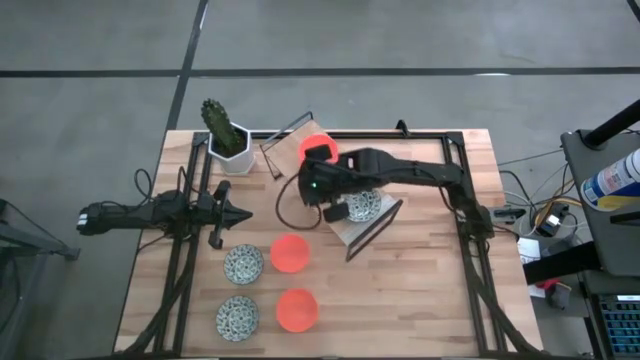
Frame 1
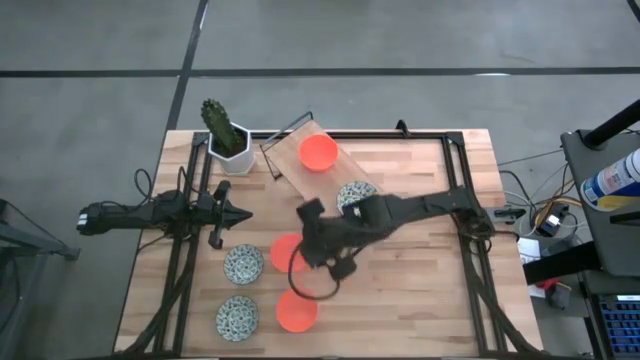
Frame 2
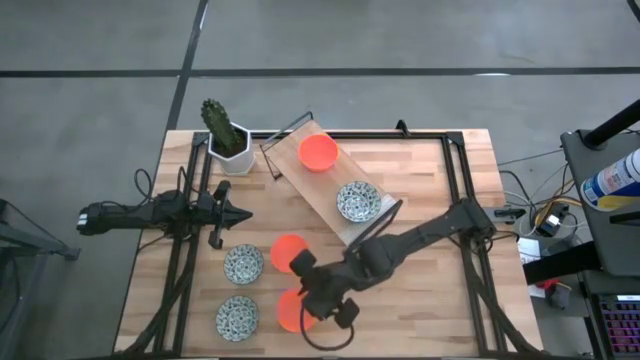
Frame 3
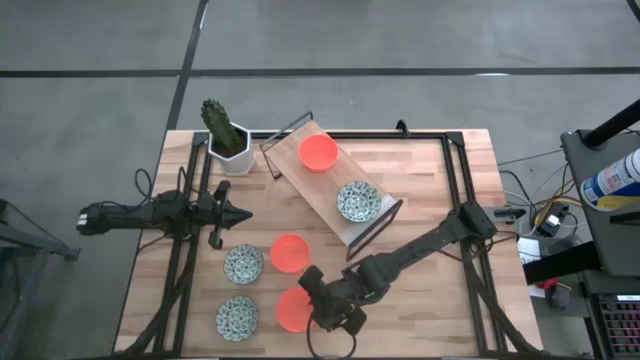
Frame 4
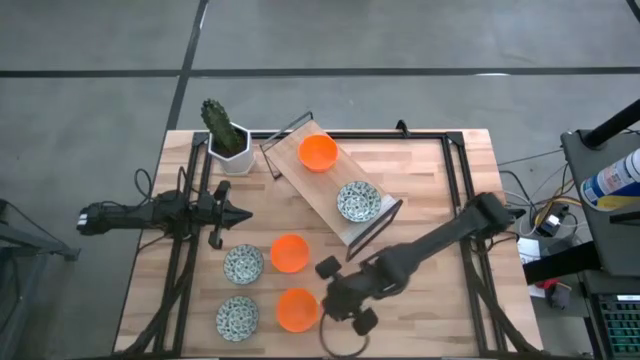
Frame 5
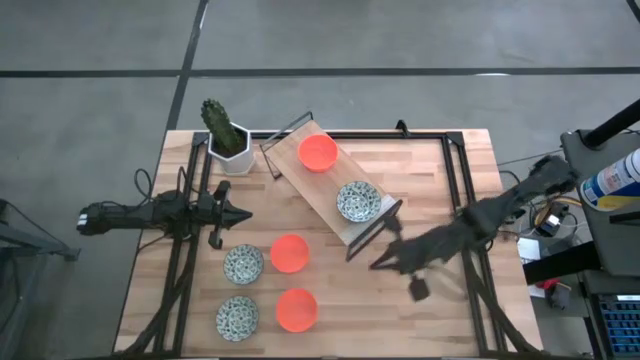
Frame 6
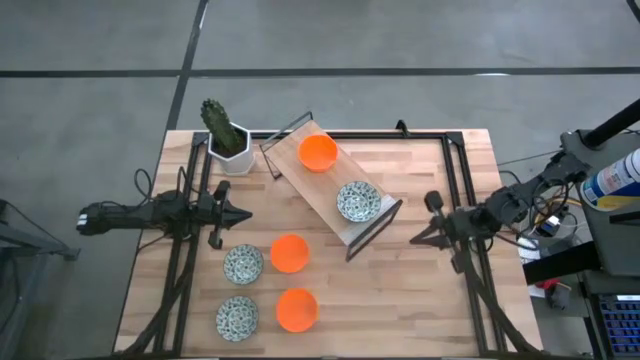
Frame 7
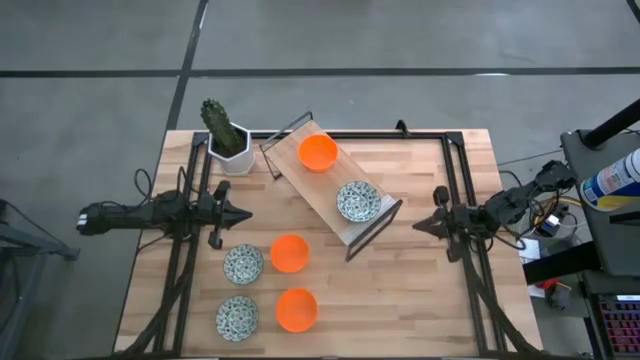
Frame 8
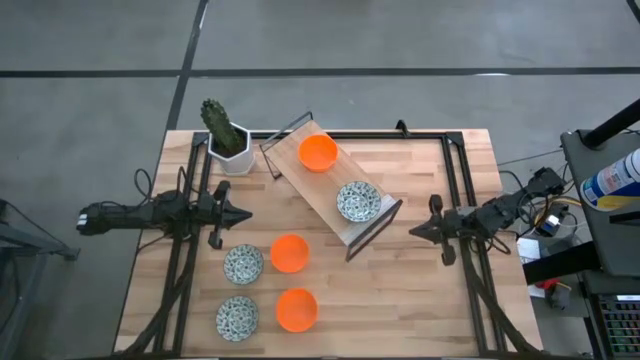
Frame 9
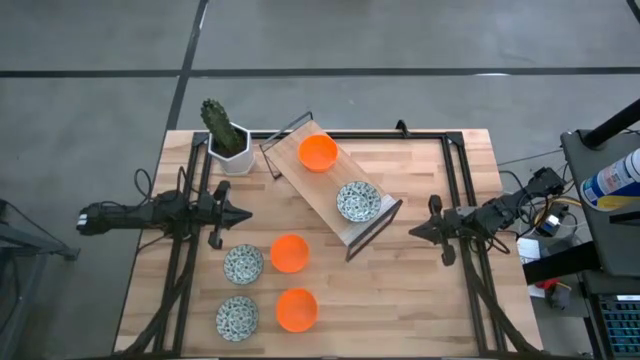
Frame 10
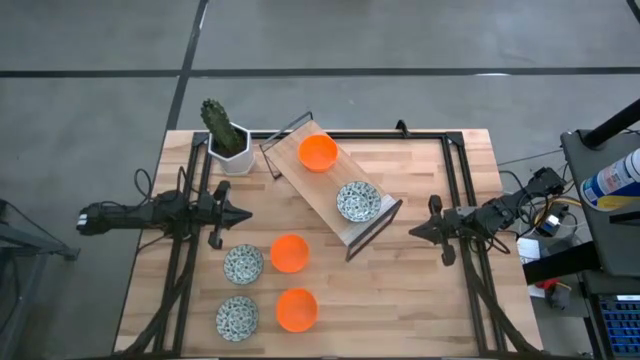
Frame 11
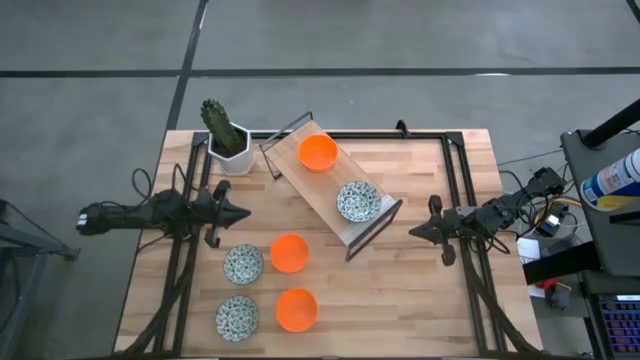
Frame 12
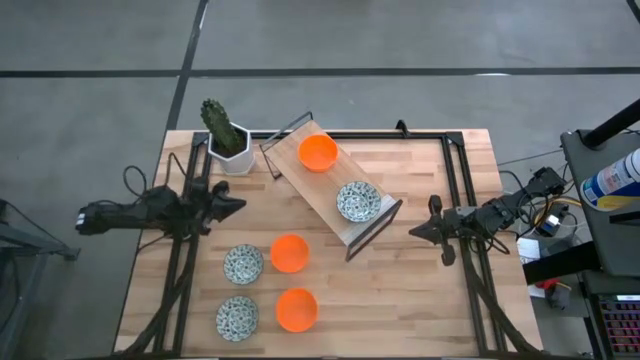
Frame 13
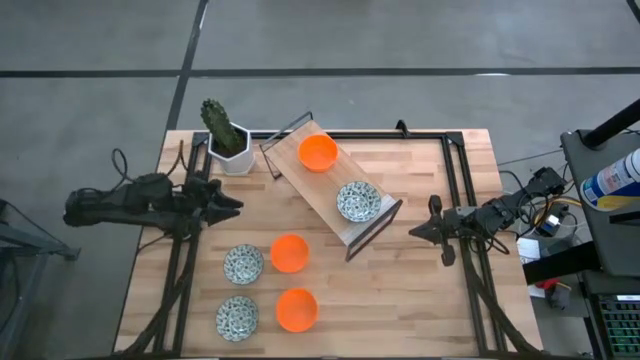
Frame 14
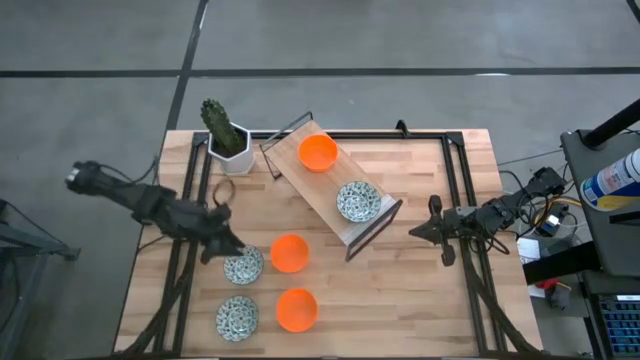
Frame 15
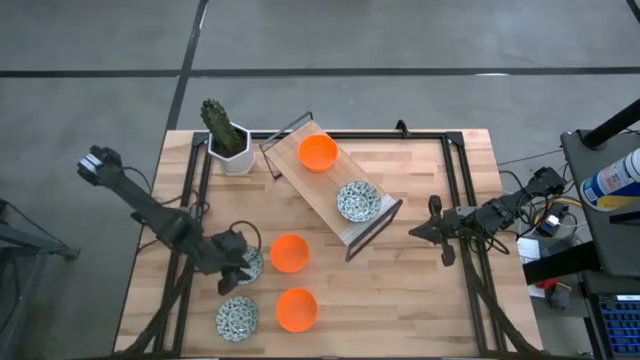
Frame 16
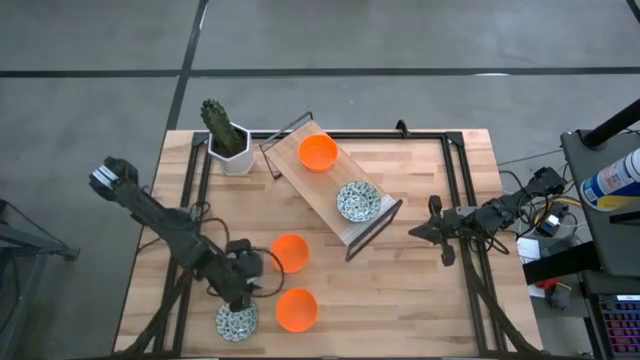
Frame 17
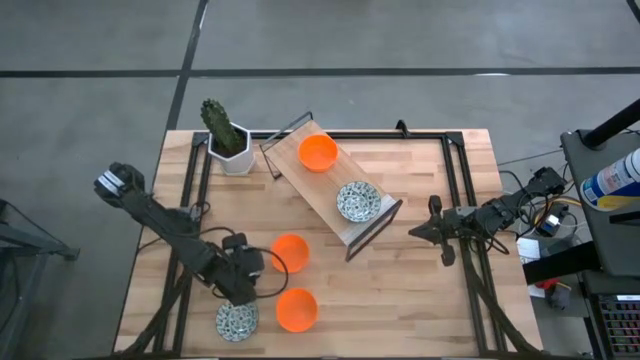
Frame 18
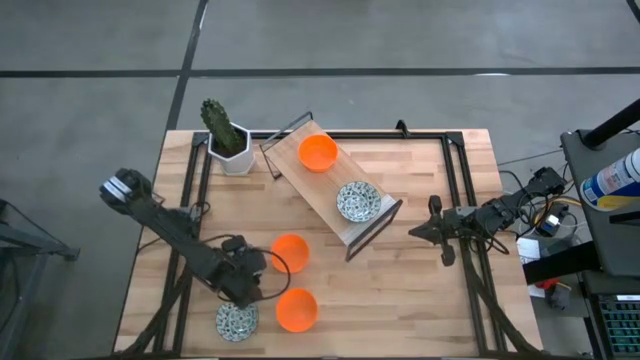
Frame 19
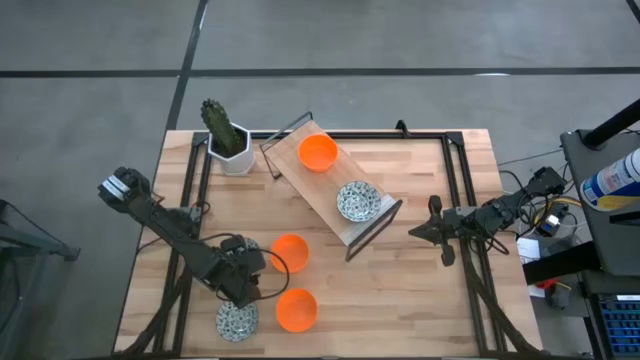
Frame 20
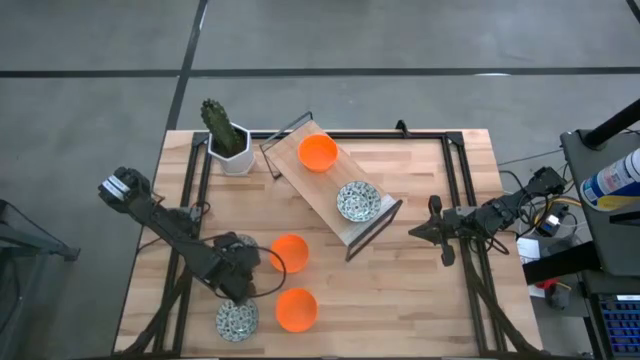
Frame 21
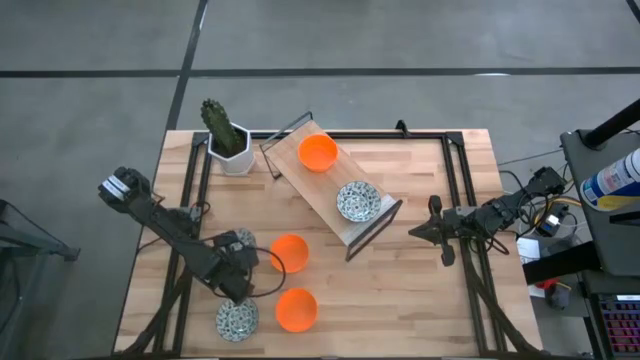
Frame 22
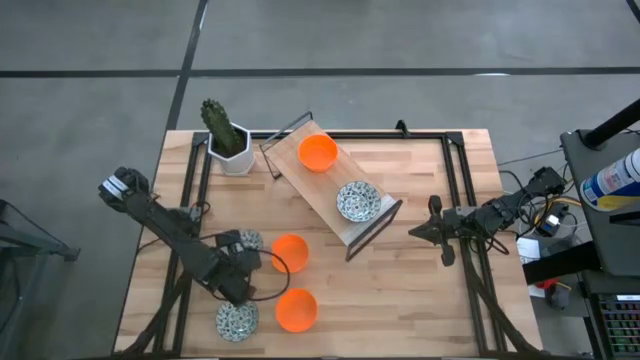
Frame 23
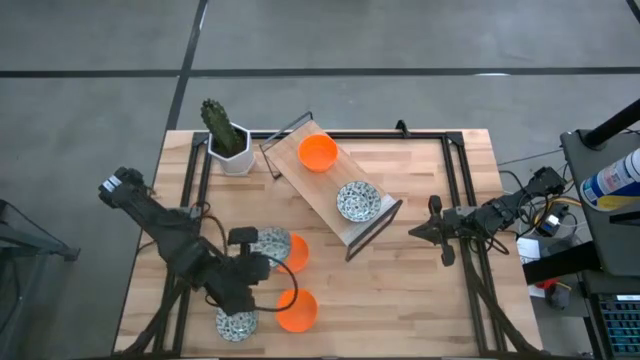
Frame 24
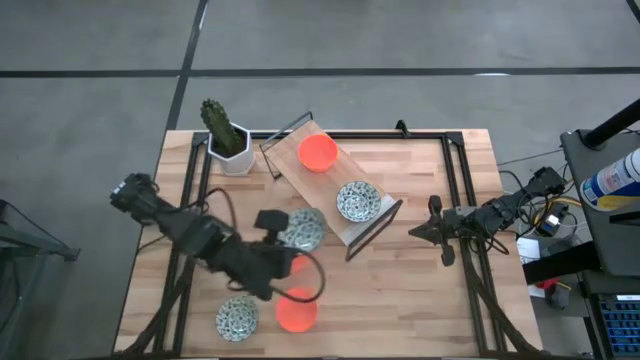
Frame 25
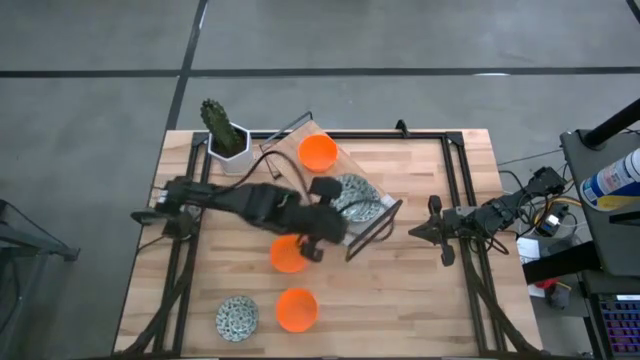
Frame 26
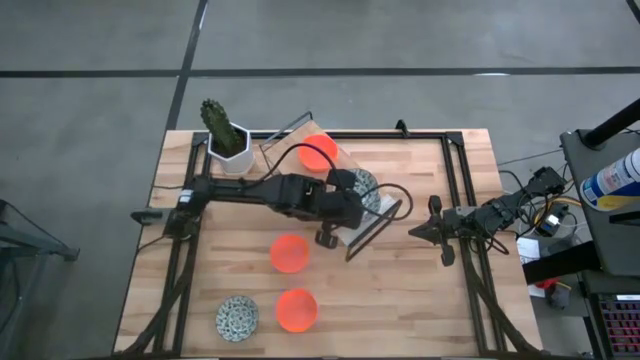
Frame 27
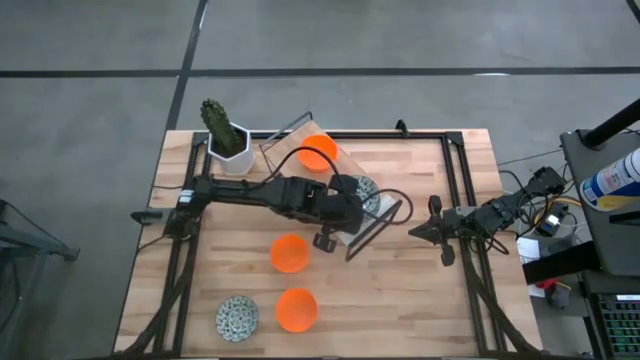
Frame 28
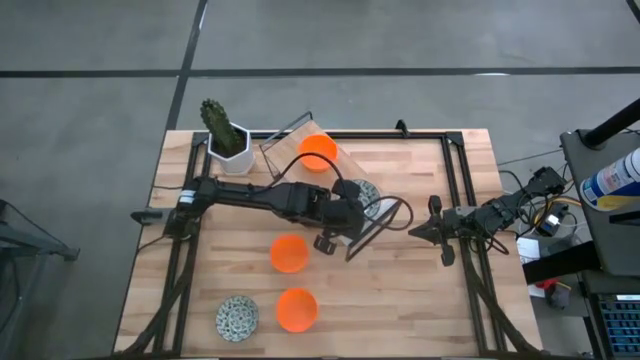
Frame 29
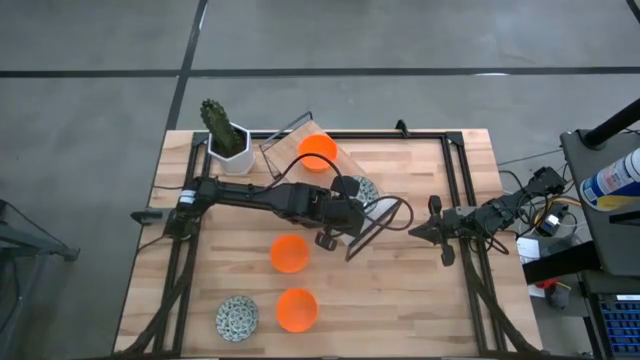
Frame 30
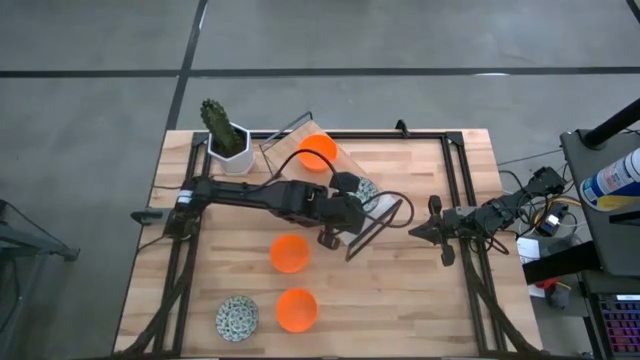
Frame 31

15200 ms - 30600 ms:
Task: Pick & Place Mini bowls
Stack the top white patterned bowl on the white patterned bowl on the shelf

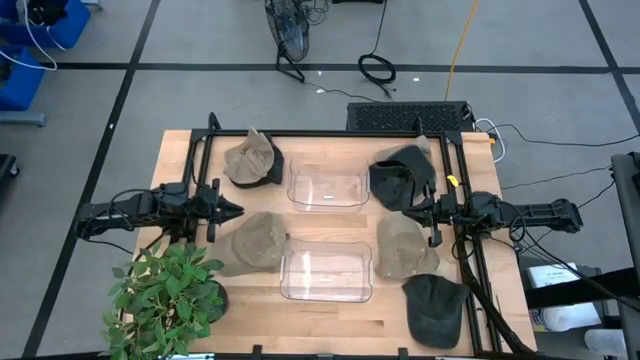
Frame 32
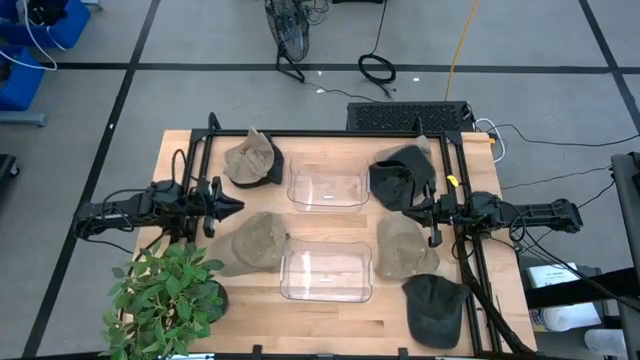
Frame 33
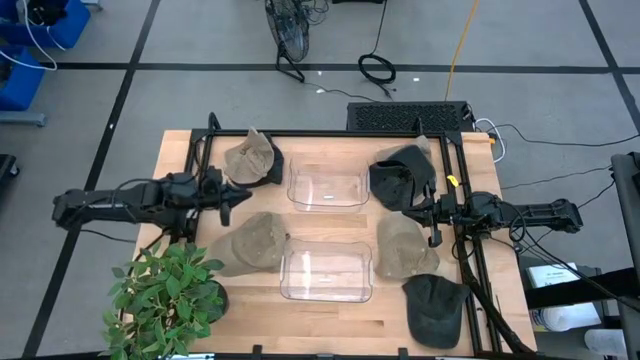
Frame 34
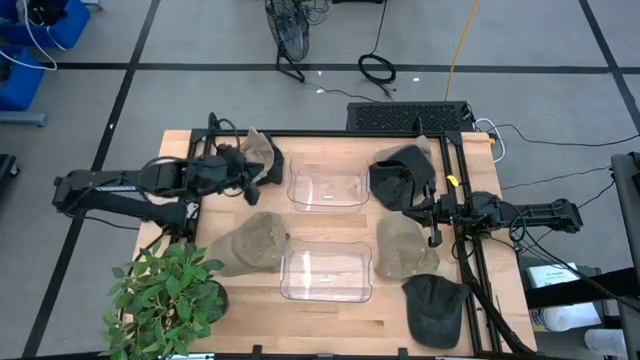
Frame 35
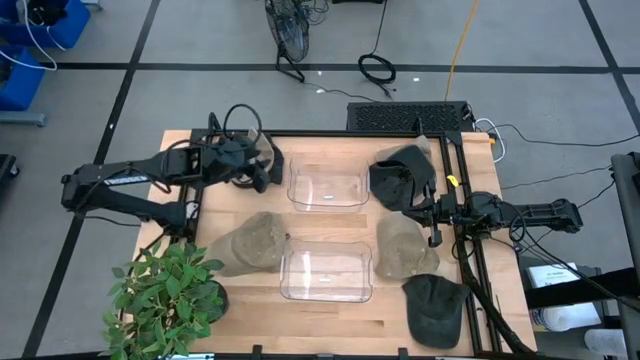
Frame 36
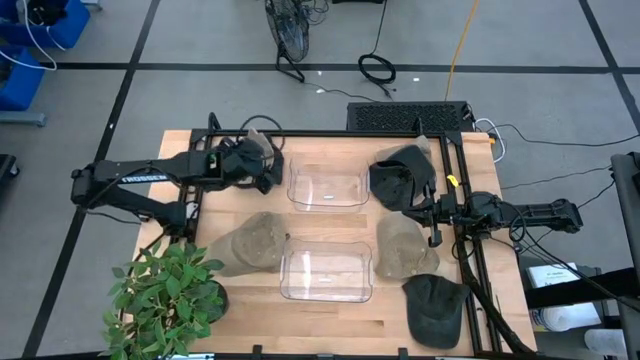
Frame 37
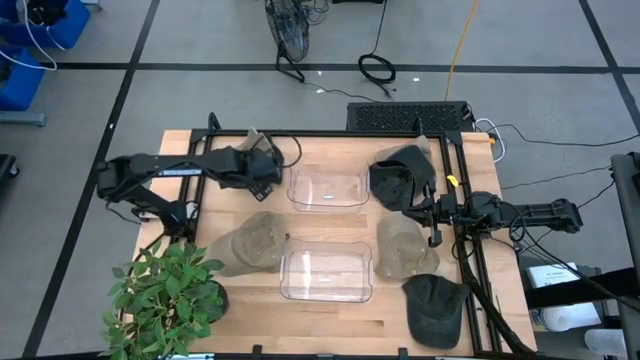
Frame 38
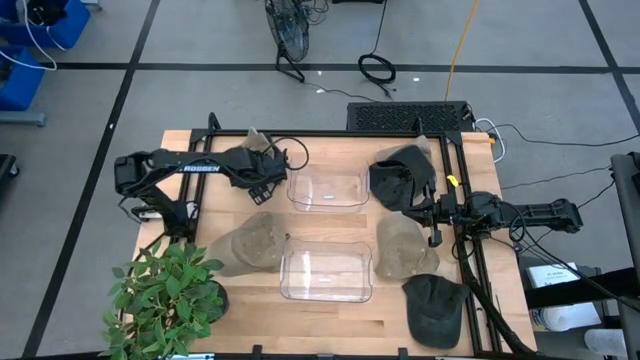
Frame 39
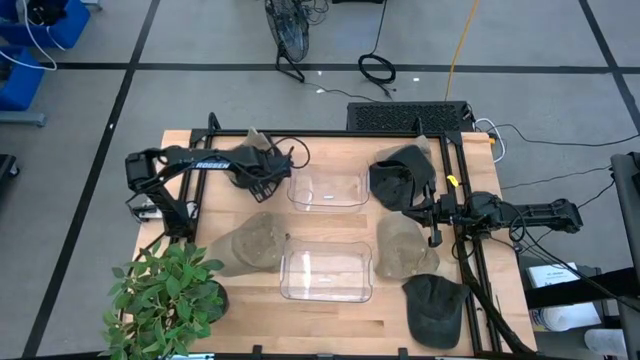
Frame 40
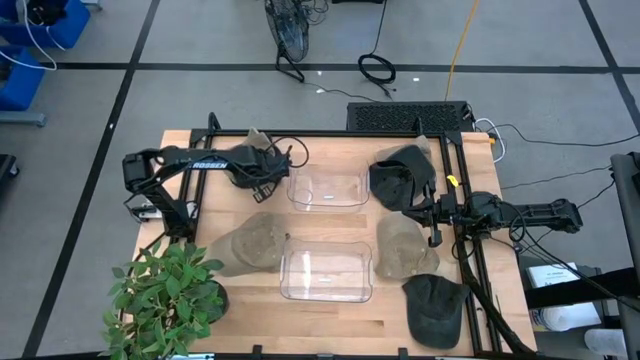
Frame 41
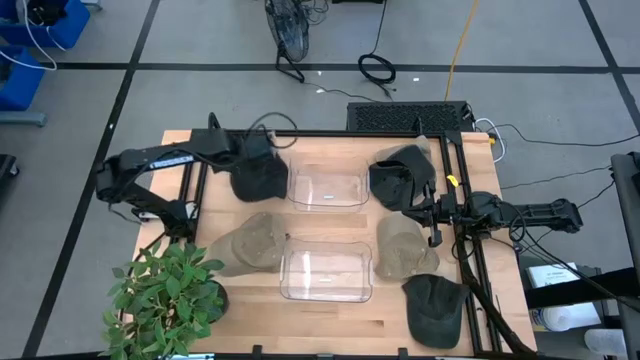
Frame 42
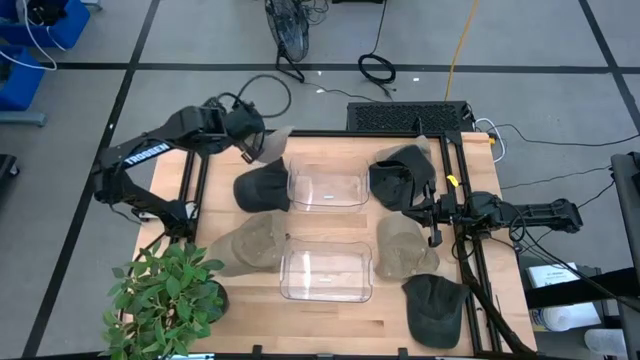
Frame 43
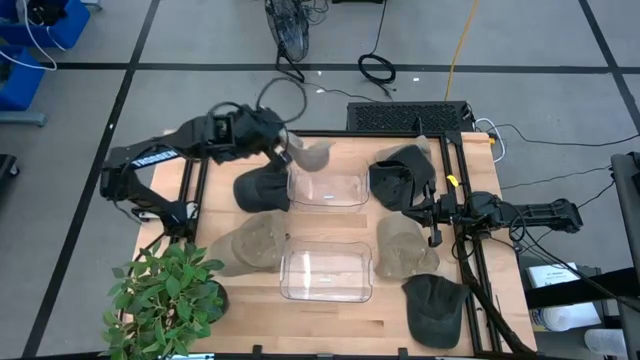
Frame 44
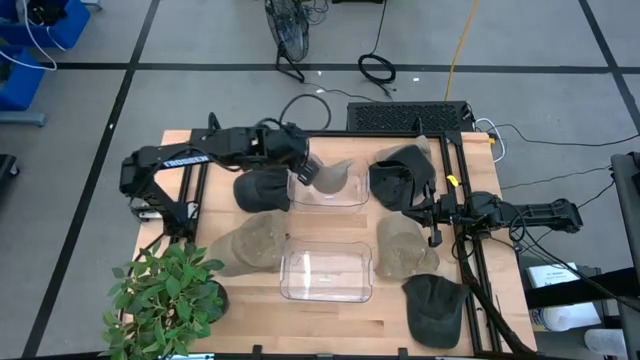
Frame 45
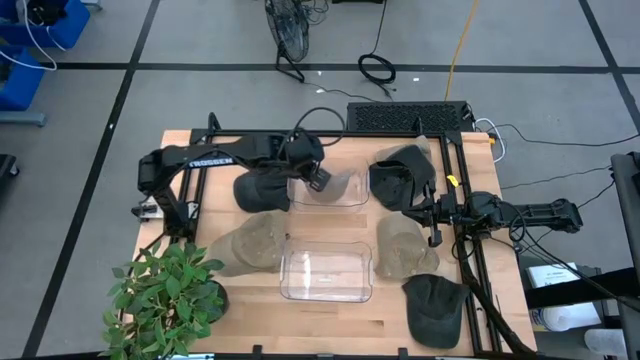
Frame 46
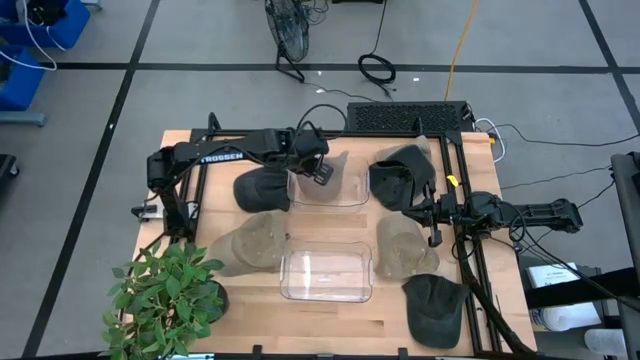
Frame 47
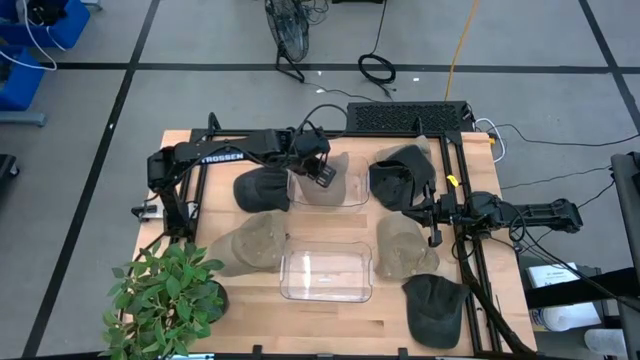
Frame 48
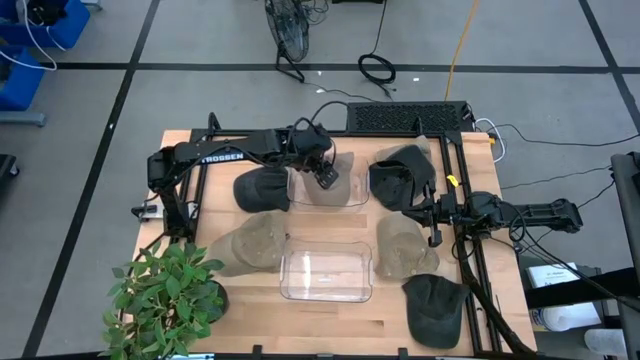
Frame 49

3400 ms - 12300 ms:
Task: Pick & Place hat
Put the brown cap into the top transparent bin
